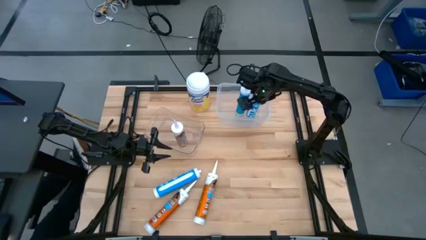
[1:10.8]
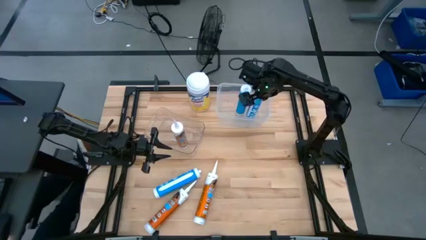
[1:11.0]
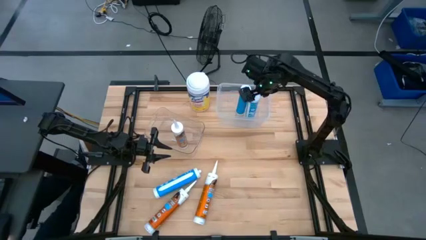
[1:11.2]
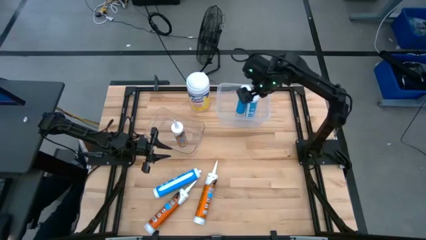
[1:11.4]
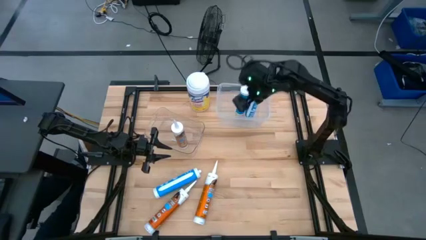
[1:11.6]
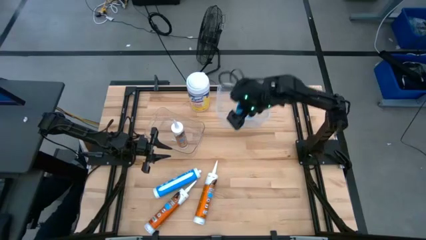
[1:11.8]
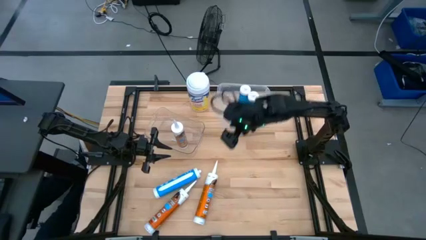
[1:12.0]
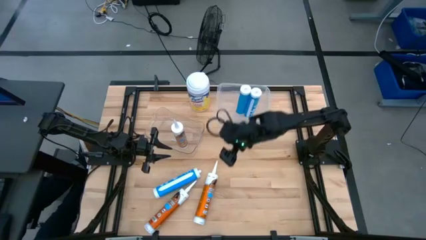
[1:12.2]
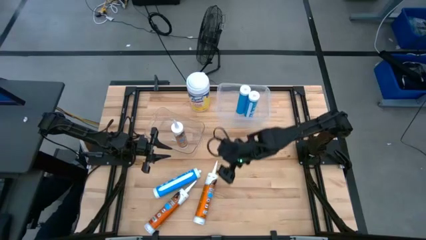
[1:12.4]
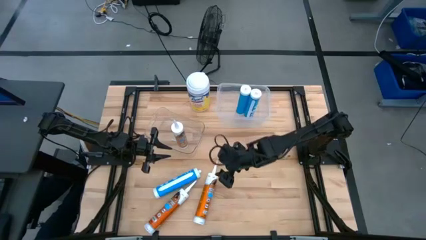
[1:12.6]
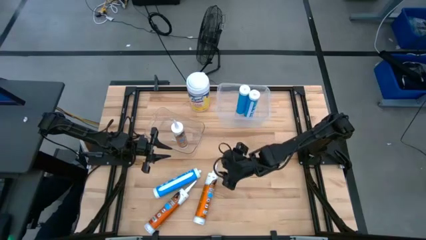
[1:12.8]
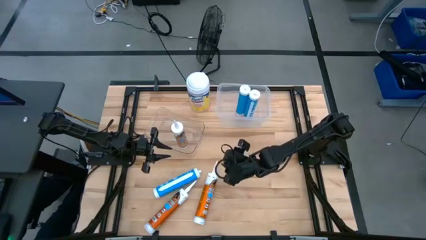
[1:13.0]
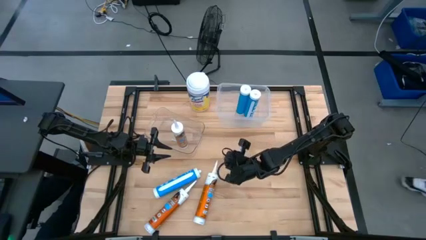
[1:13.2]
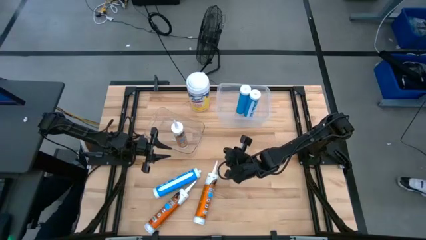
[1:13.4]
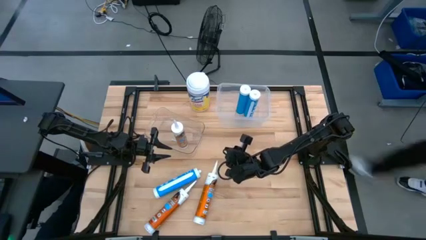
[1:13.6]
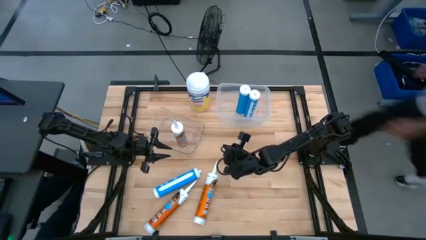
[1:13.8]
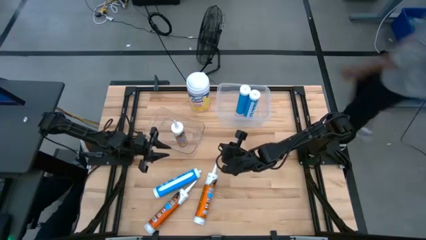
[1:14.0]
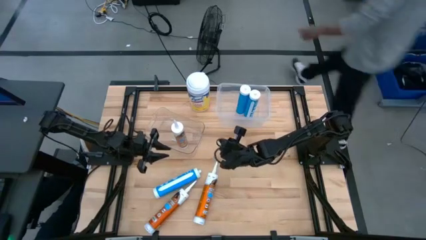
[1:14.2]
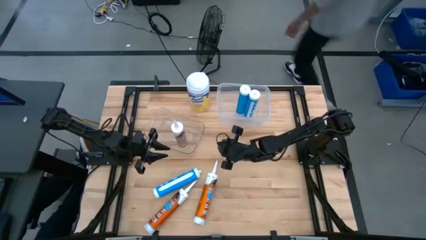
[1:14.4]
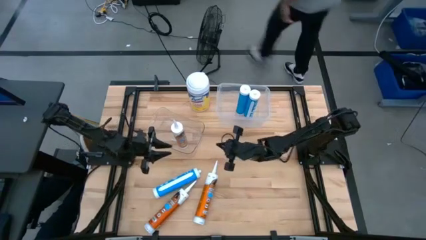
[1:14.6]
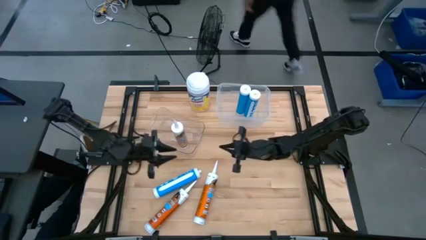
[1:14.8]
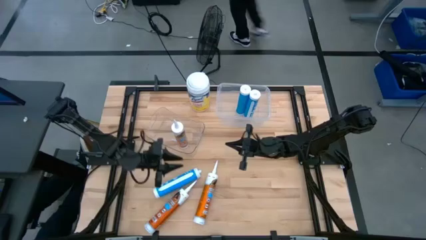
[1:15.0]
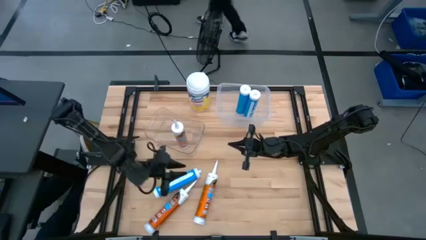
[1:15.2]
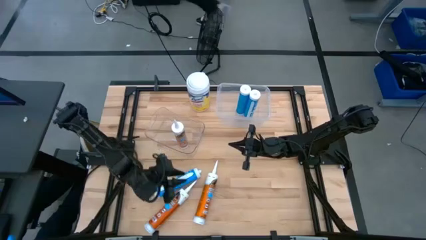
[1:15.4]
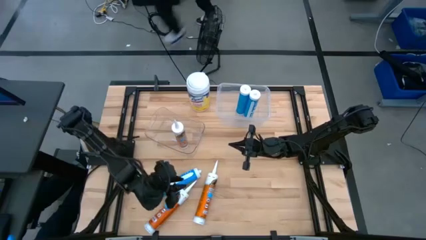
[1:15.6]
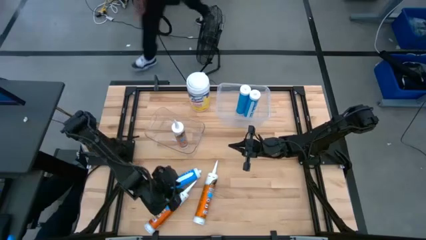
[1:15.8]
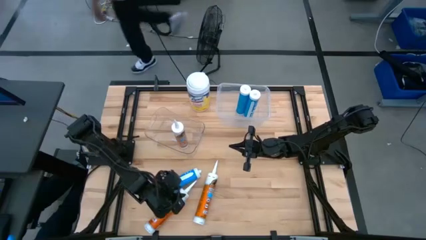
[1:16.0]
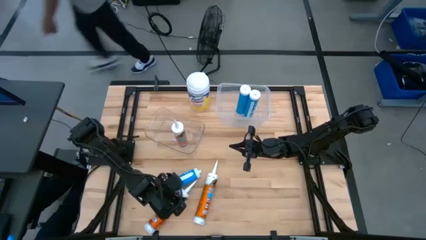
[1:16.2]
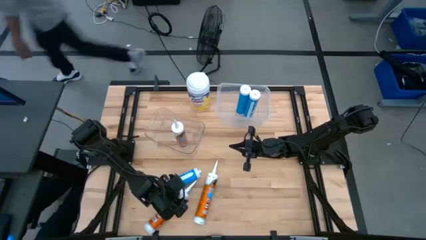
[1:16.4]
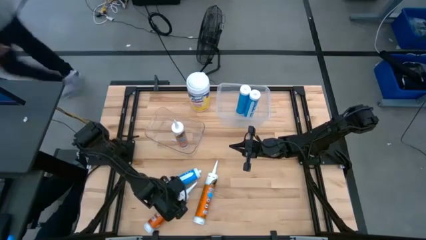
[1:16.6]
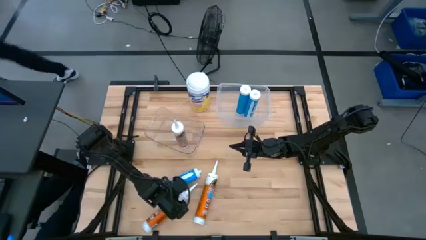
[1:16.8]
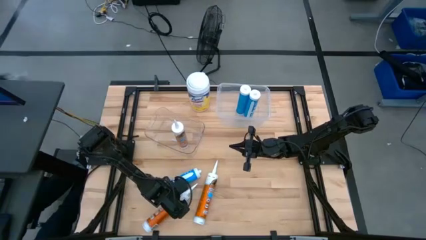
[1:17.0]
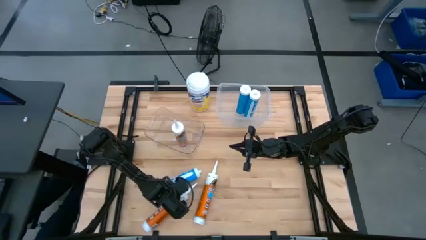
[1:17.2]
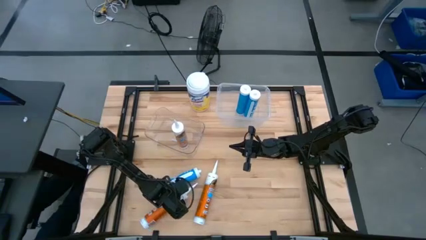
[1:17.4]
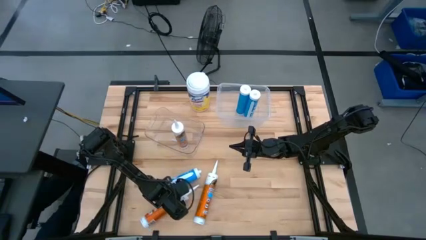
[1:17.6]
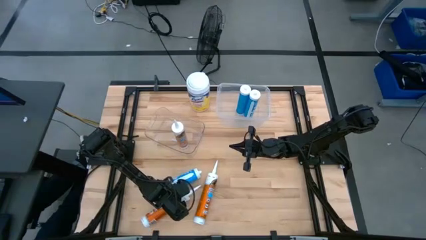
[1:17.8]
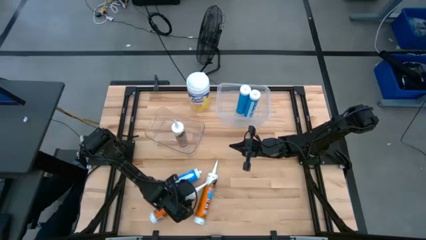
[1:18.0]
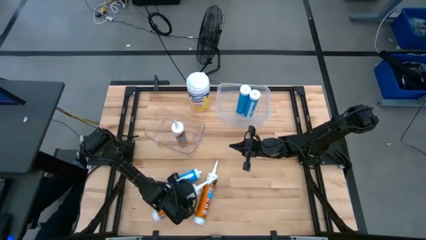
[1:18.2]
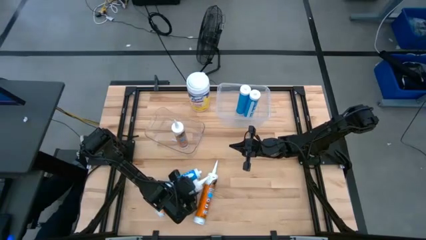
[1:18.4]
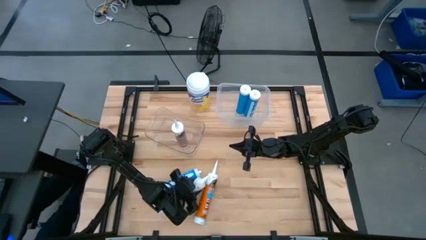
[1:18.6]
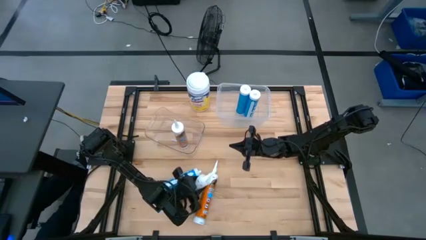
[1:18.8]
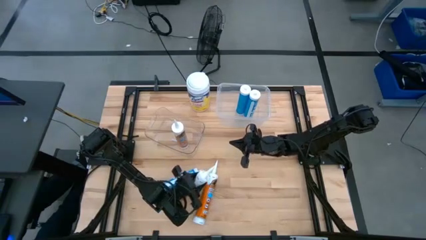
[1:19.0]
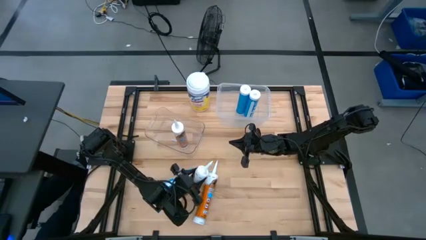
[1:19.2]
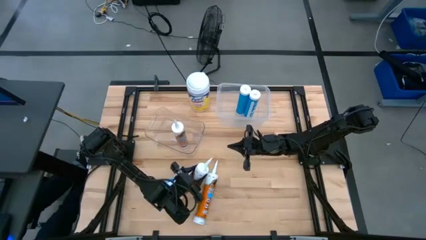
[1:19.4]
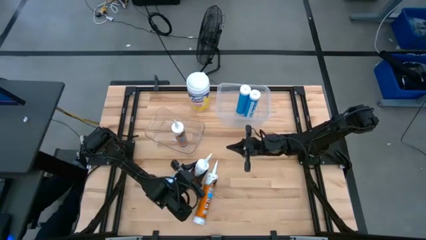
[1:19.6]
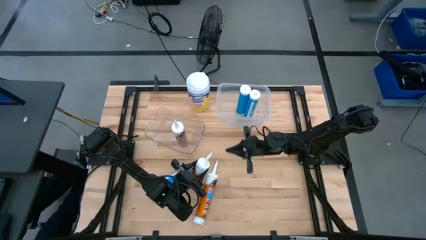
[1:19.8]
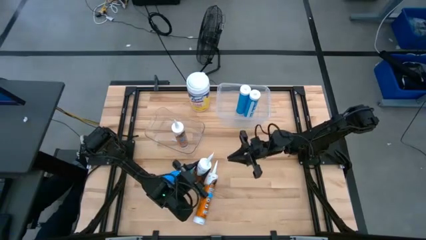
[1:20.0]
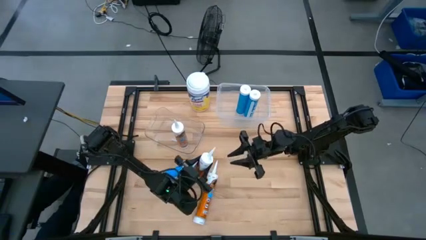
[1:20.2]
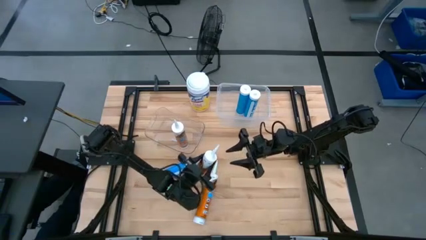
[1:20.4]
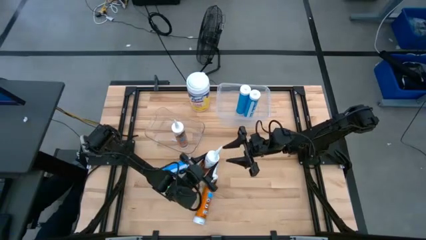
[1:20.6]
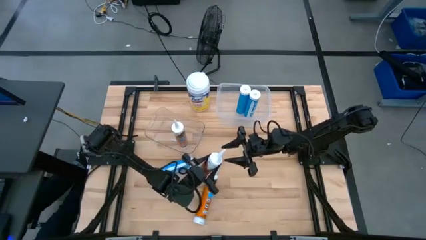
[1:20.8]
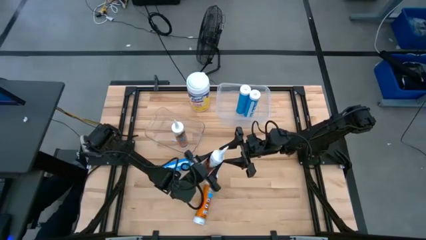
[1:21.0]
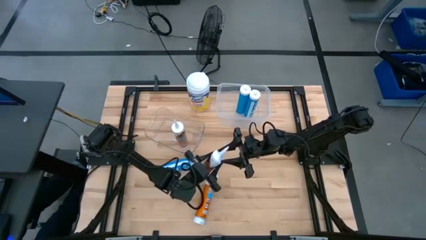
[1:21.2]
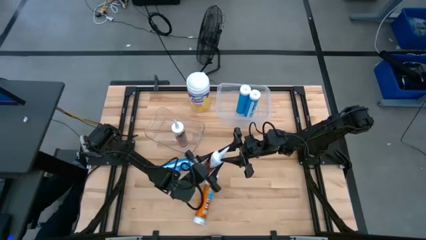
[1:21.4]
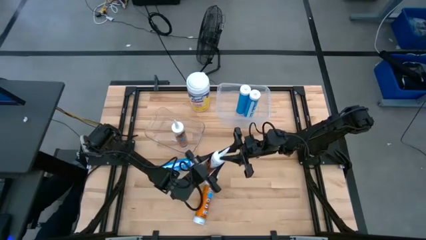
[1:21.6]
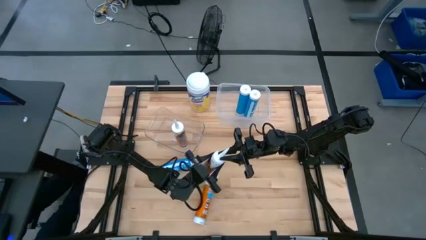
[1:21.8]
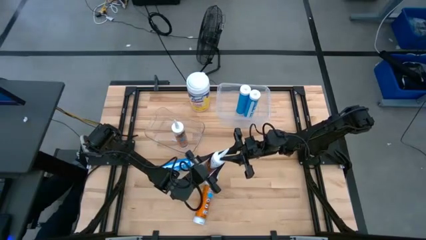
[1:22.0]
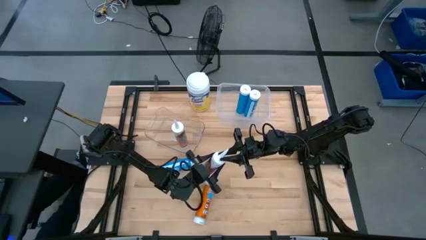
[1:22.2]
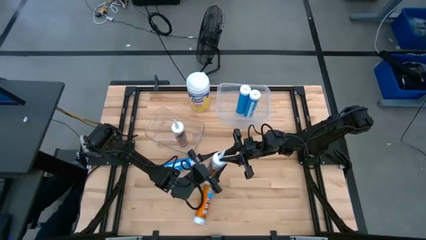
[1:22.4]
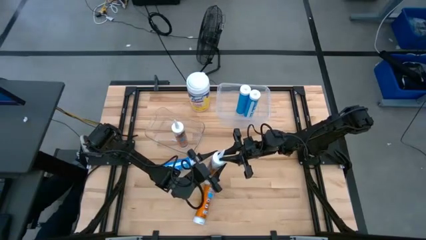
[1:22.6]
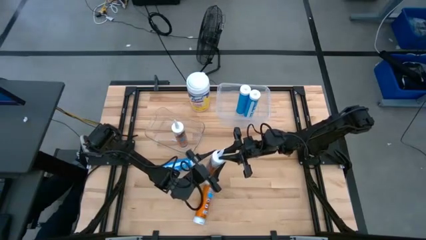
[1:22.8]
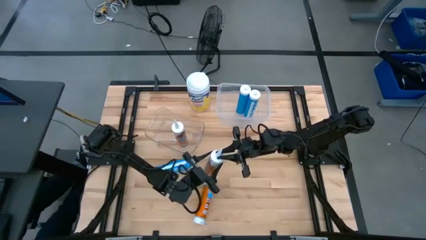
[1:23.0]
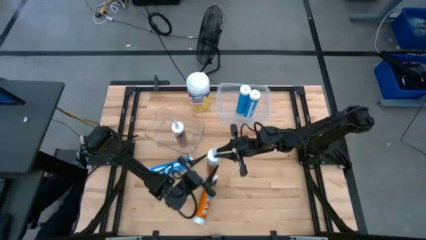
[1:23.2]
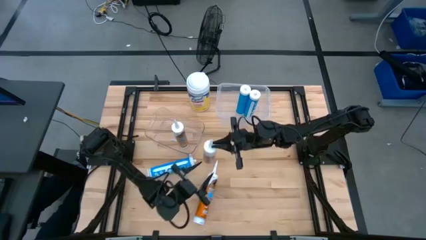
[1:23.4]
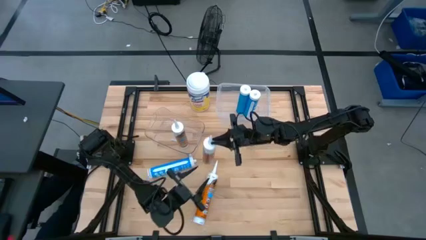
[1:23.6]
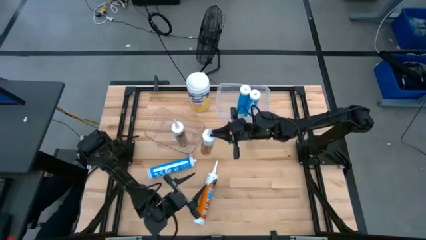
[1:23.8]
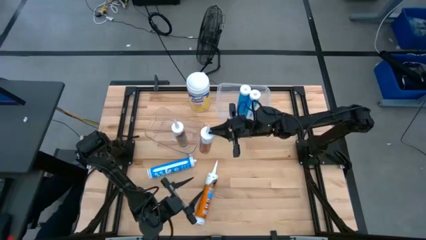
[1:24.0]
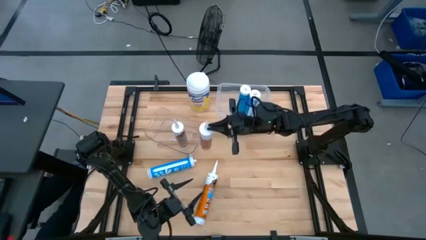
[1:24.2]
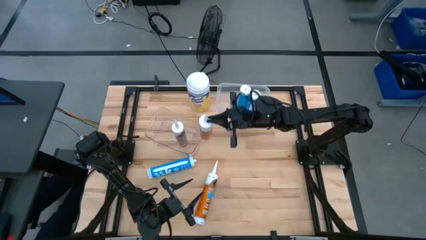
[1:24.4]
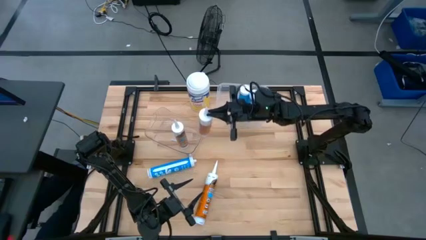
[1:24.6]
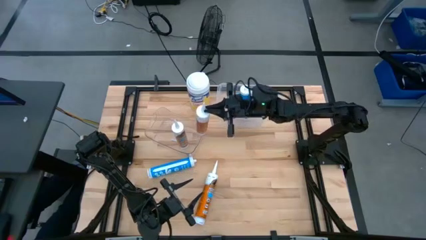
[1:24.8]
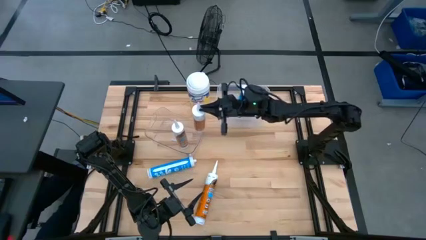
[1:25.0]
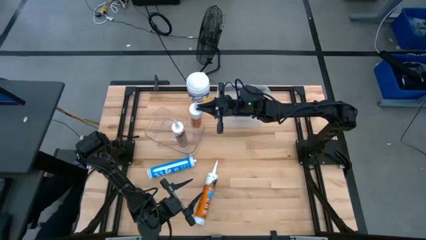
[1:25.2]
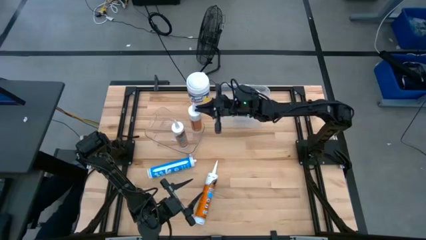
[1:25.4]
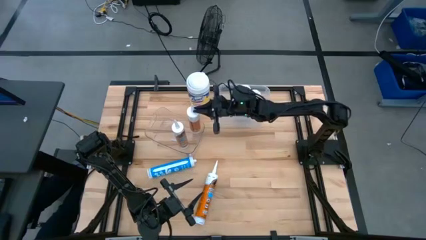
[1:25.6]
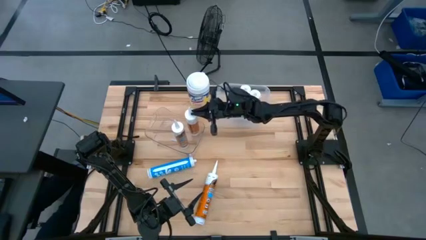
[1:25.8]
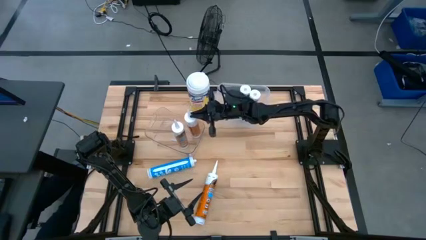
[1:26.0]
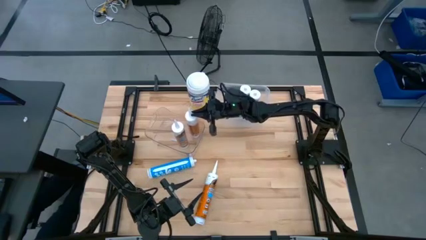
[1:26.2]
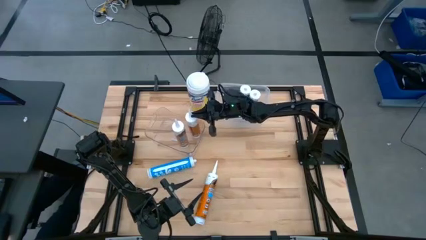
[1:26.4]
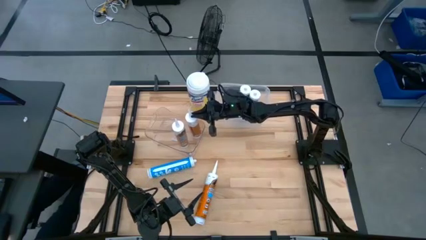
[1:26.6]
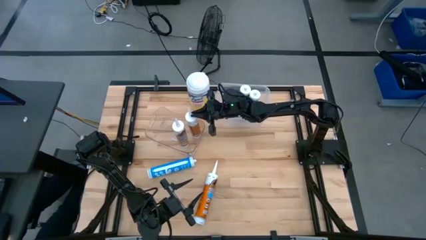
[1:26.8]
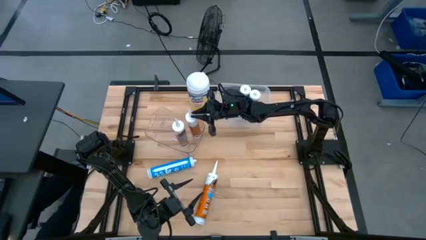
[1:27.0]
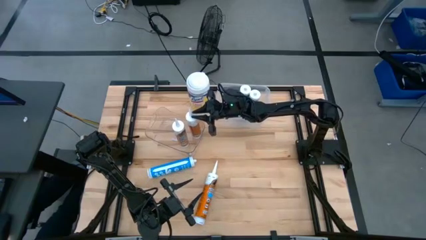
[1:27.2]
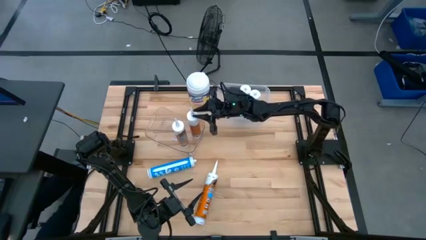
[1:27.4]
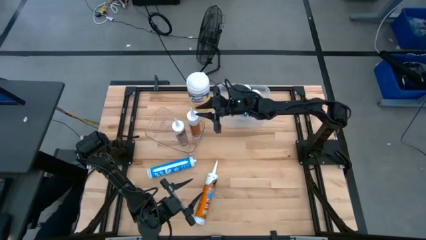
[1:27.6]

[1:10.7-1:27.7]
Task: Pick & place silicon tubes, Sealant and Lysol wipes
Put the left orange sealant into the left transparent bin
